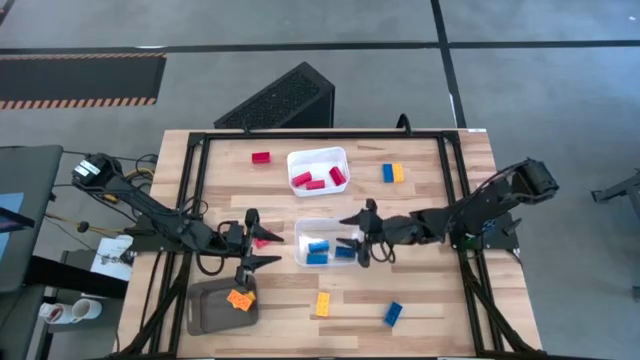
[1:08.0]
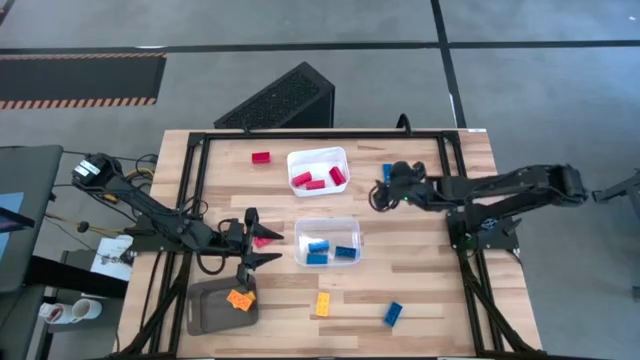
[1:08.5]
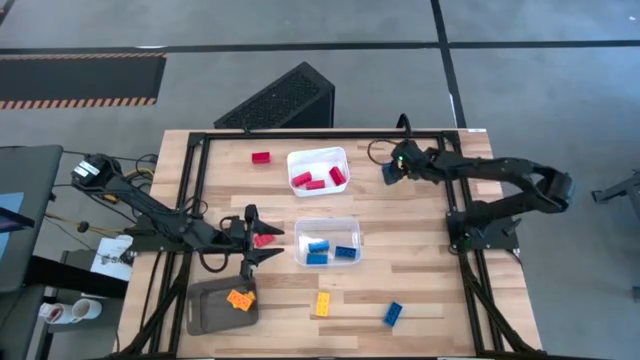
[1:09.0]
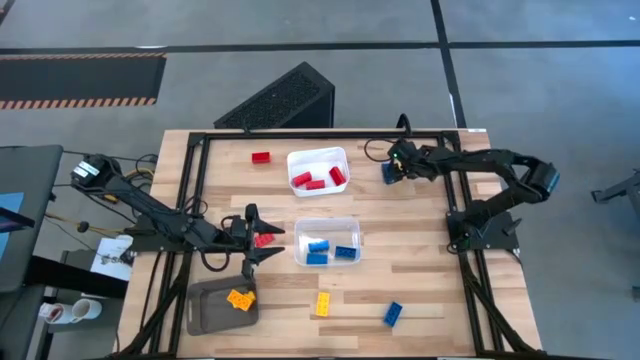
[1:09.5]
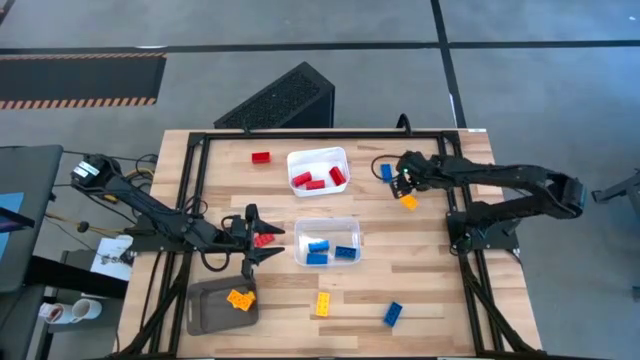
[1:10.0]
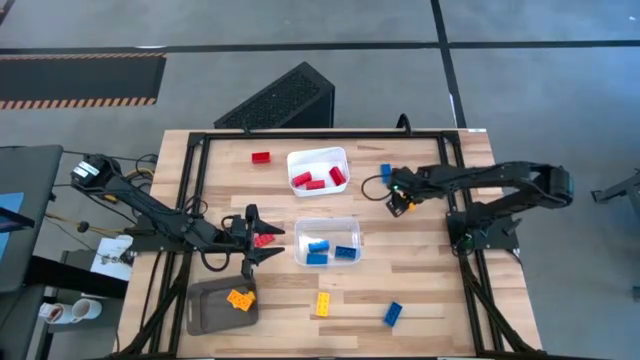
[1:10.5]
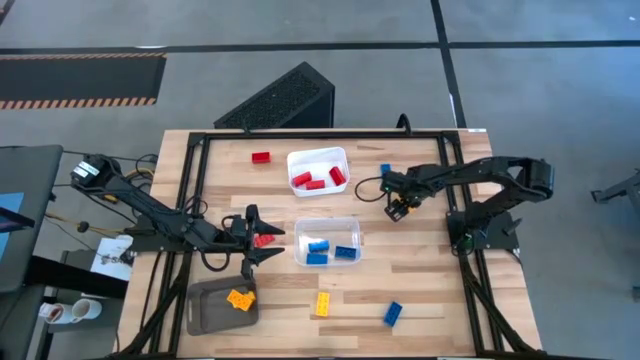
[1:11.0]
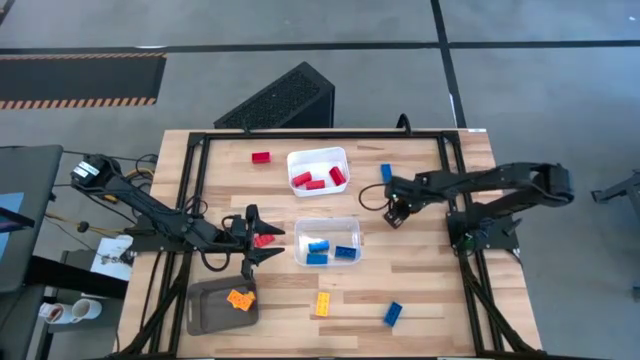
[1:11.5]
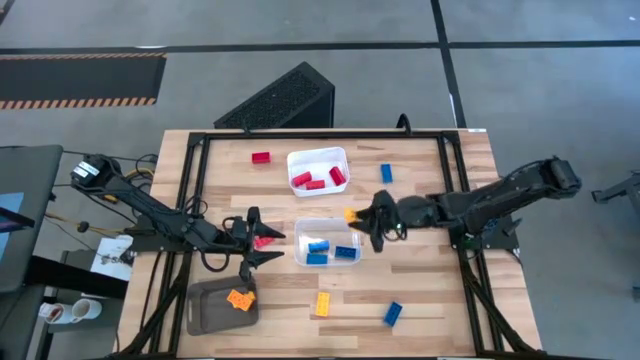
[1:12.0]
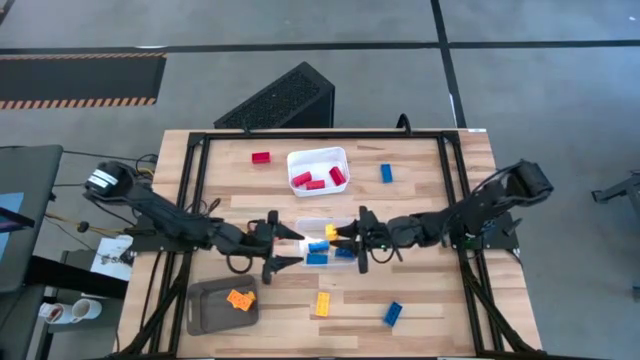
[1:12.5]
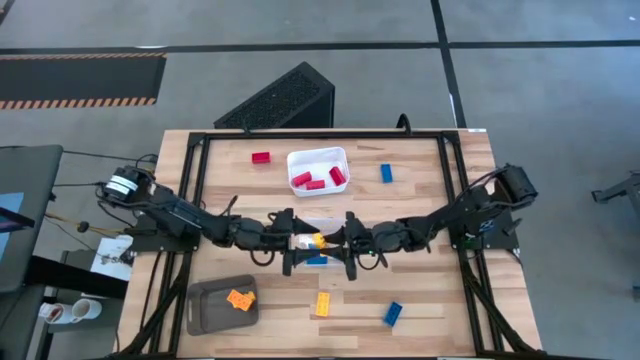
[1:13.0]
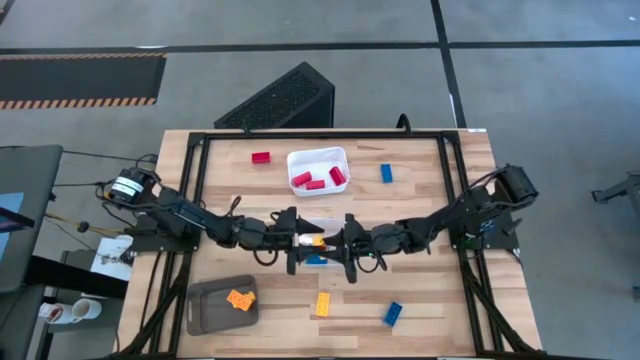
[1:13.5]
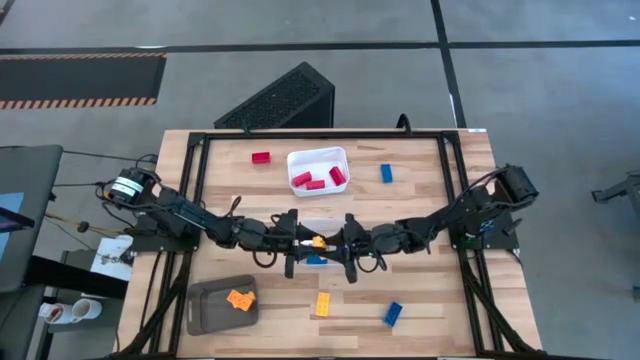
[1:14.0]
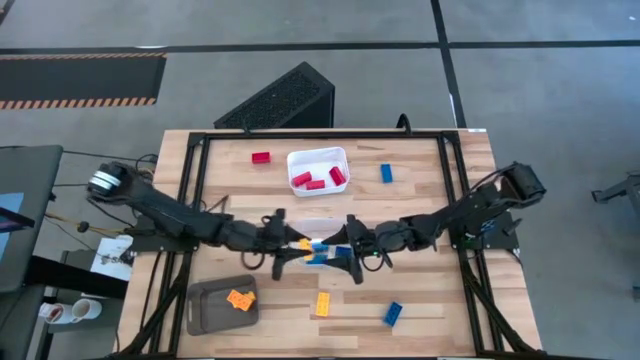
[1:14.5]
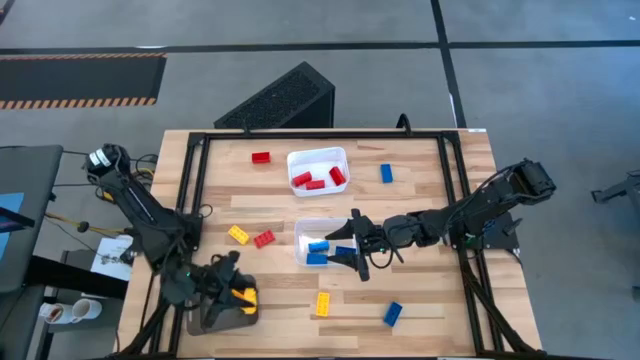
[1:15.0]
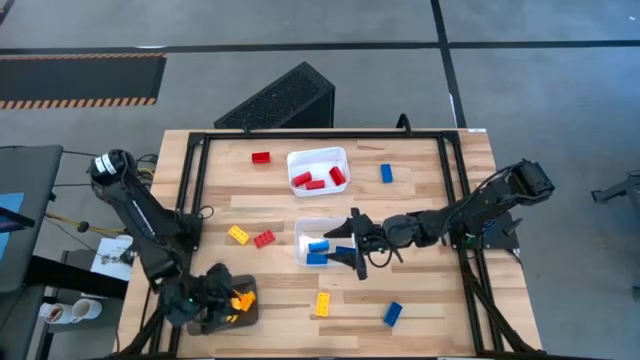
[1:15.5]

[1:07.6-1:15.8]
Task: Sort & place blocks by color
Put the yellow game piece into the black bin

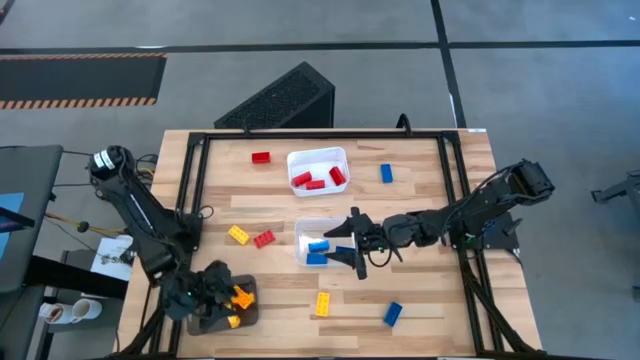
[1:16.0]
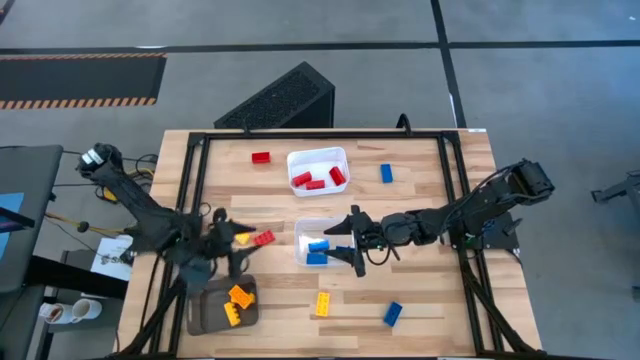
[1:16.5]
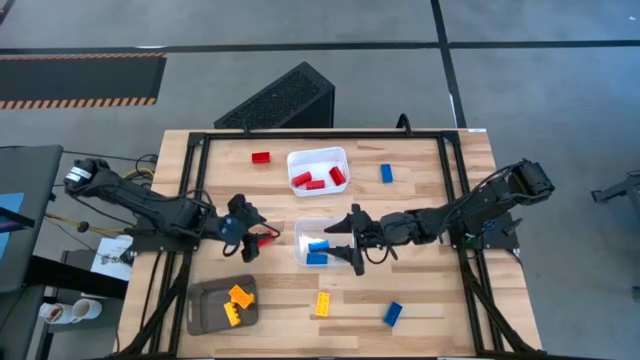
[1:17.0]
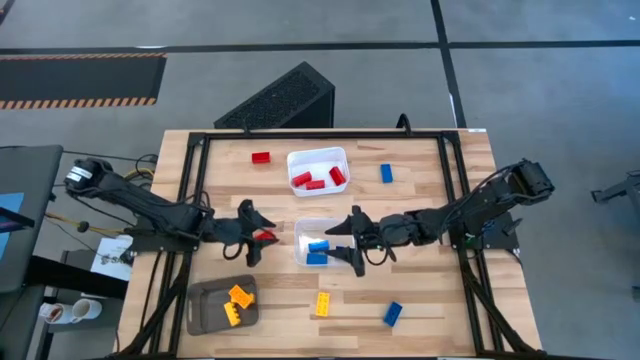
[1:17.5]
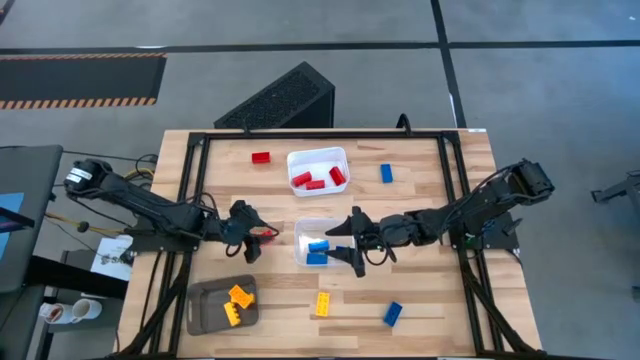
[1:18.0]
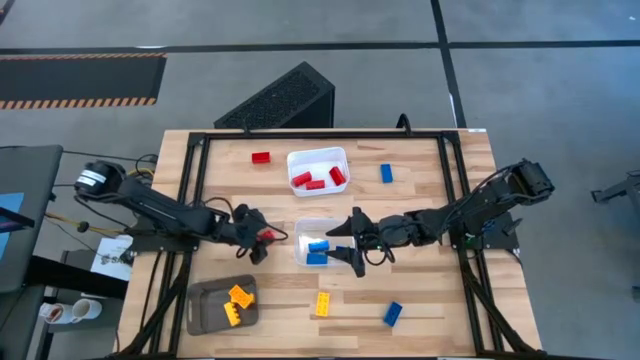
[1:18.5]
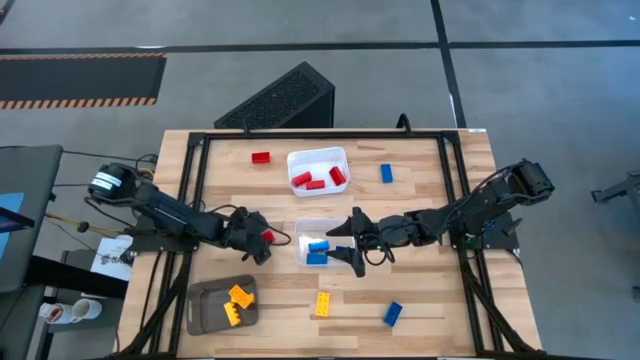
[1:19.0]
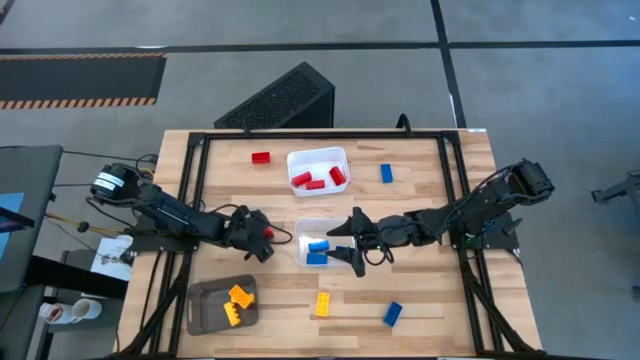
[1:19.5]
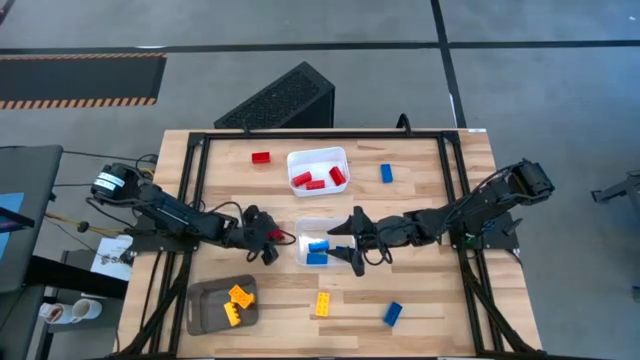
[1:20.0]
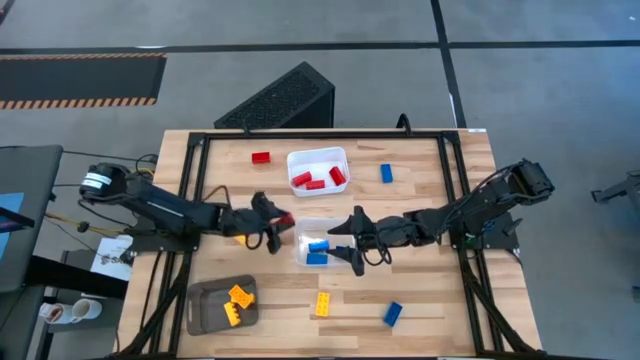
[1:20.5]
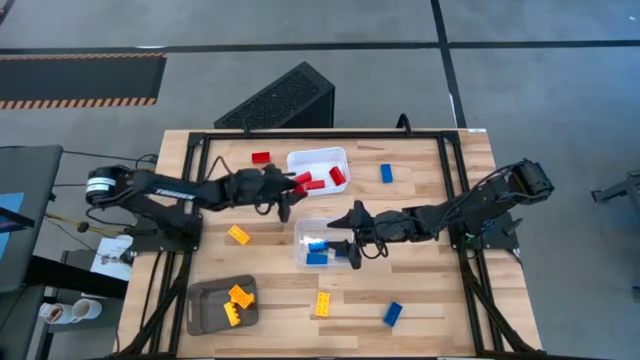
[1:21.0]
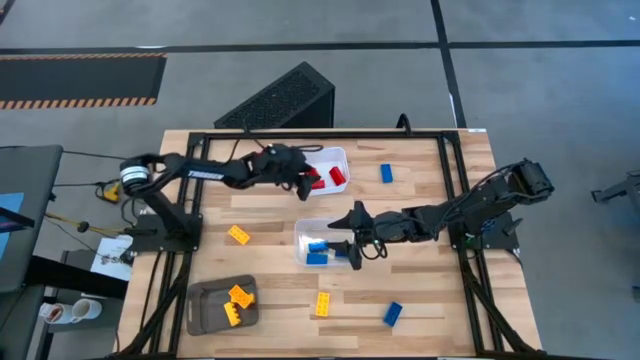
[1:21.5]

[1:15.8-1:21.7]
Put the red game piece into the white bin

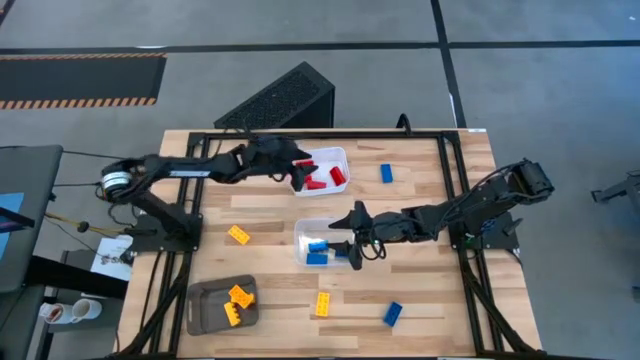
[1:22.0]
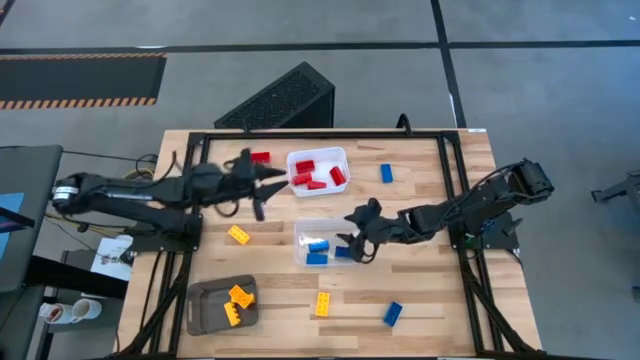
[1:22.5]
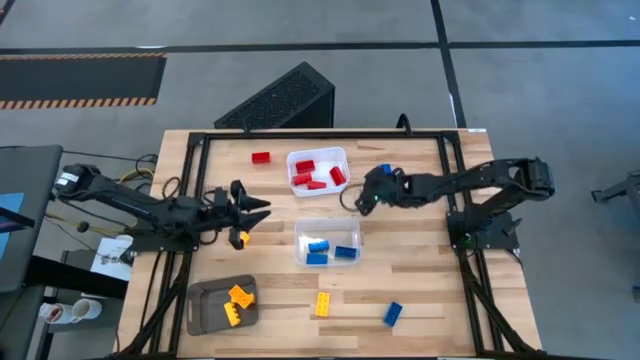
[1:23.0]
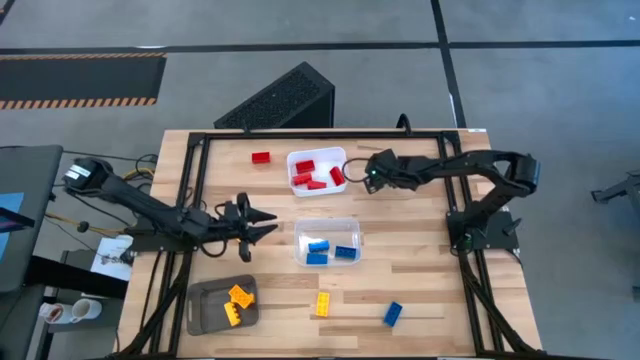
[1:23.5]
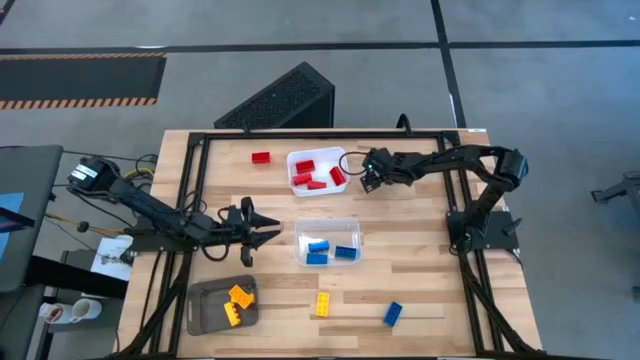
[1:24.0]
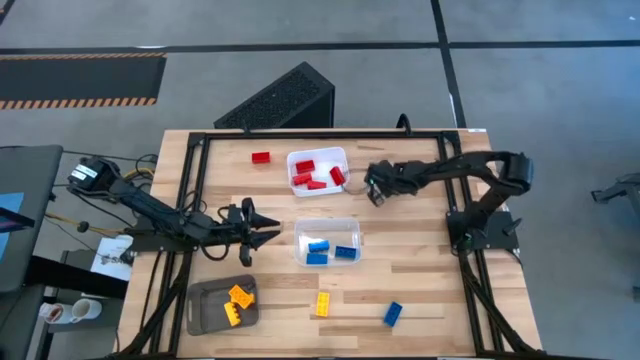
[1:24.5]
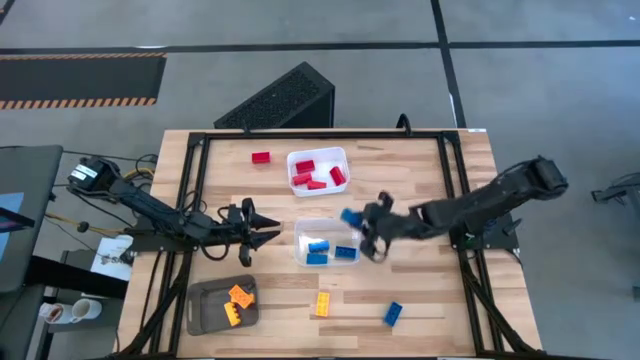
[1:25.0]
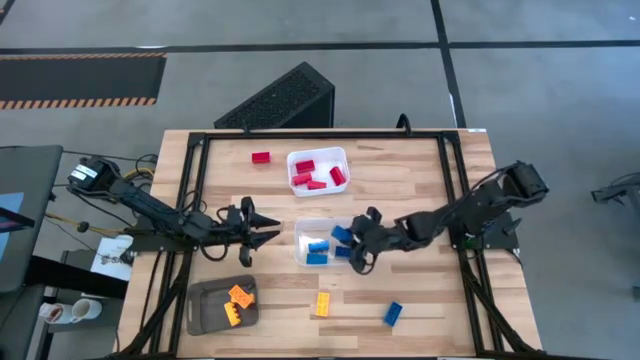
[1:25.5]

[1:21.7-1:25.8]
Put the blue game piece into the transparent bin

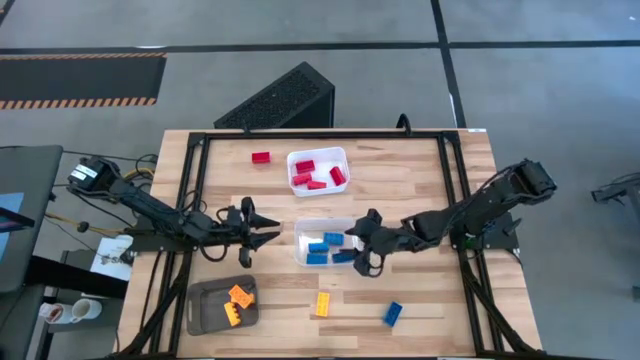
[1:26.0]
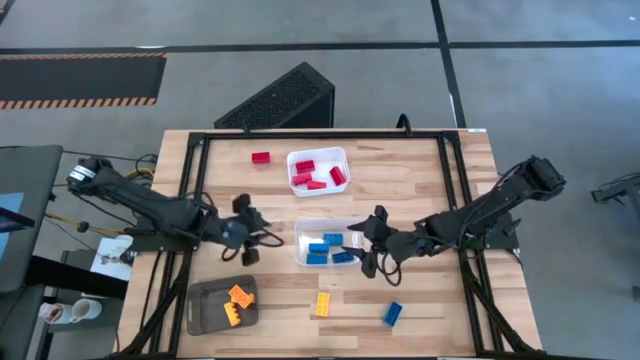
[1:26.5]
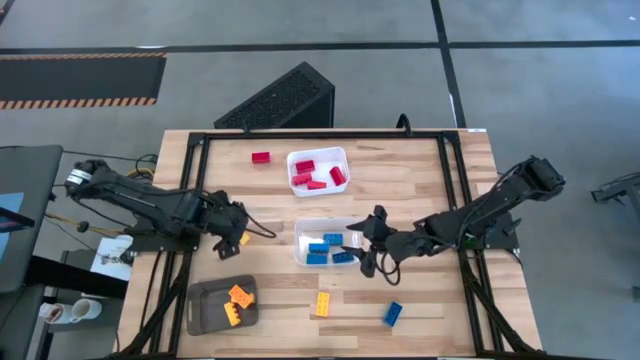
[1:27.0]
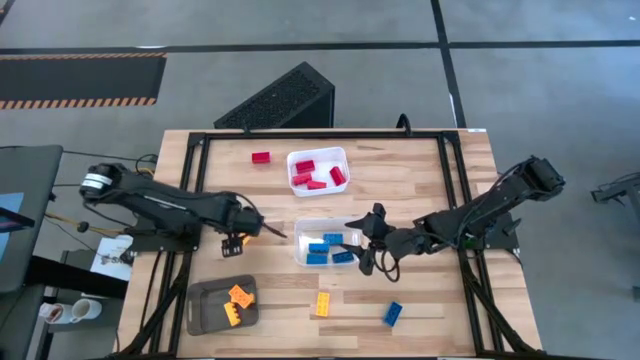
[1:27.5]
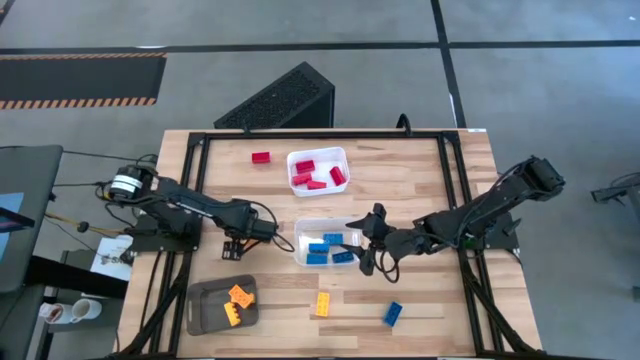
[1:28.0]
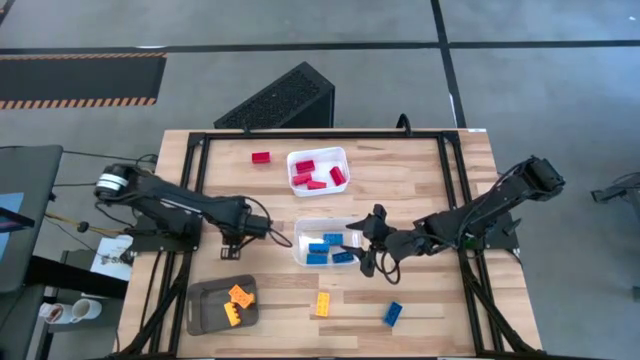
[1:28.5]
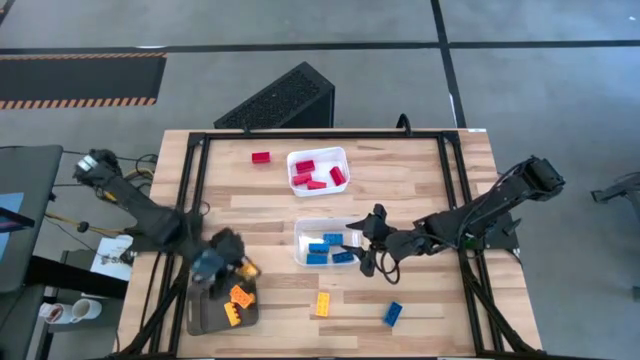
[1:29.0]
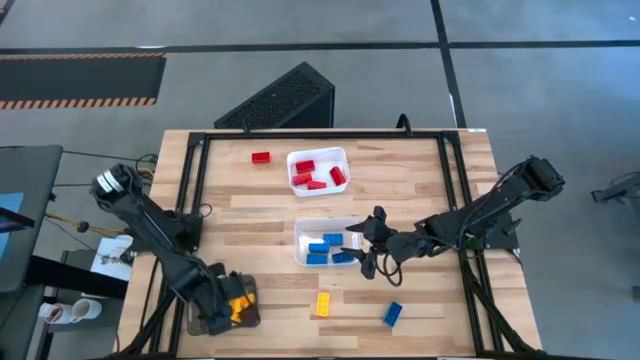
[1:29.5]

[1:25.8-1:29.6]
Put the yellow game piece into the black bin
